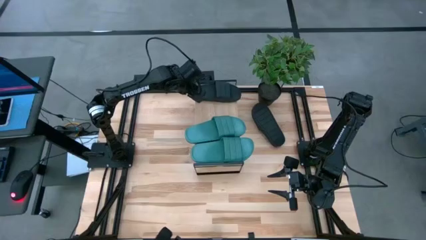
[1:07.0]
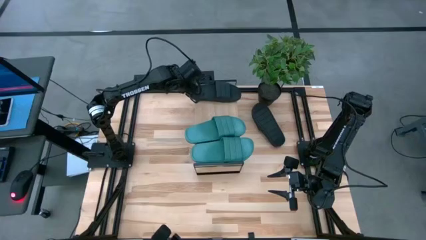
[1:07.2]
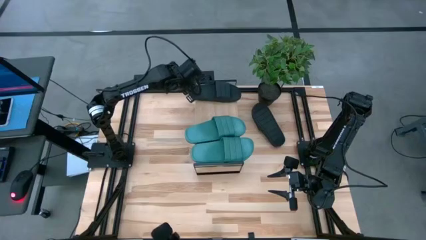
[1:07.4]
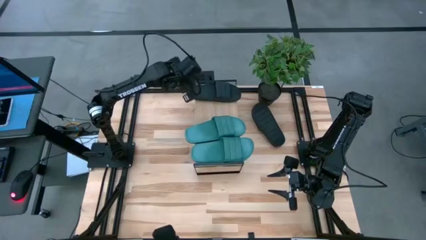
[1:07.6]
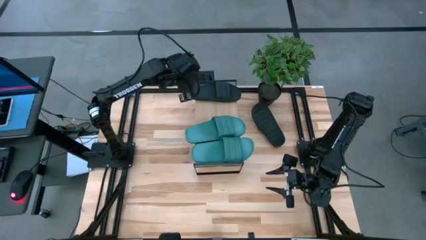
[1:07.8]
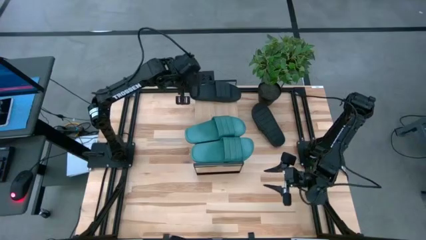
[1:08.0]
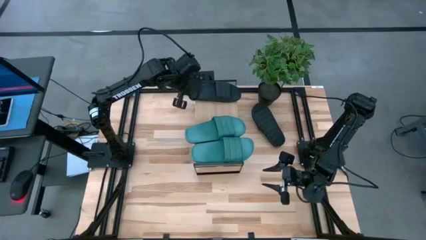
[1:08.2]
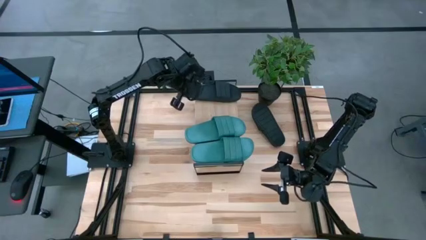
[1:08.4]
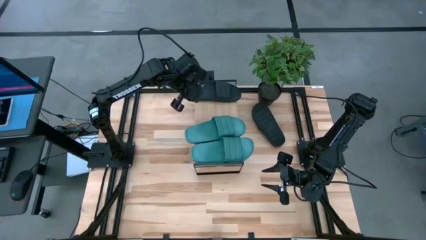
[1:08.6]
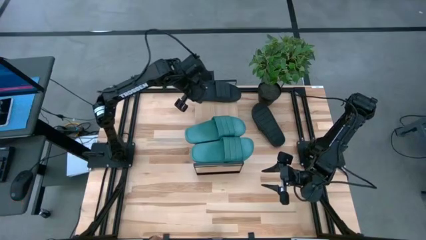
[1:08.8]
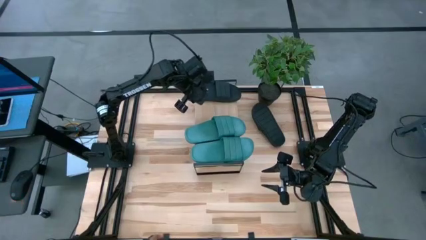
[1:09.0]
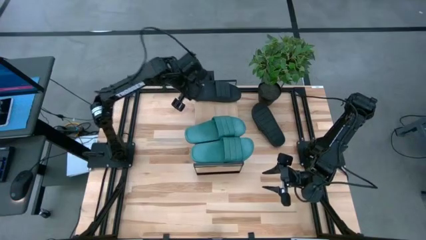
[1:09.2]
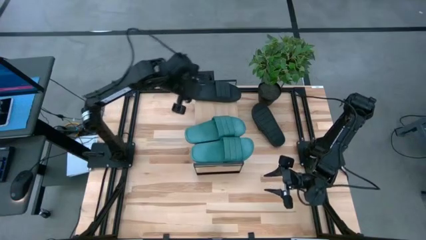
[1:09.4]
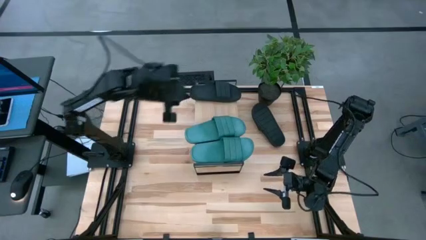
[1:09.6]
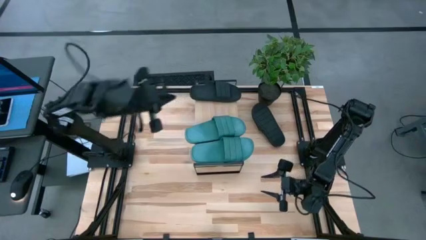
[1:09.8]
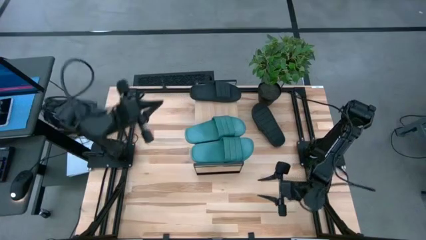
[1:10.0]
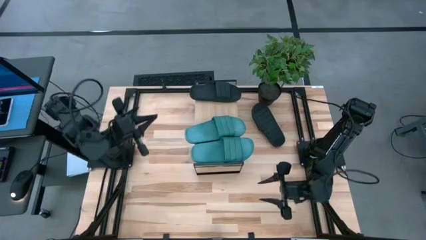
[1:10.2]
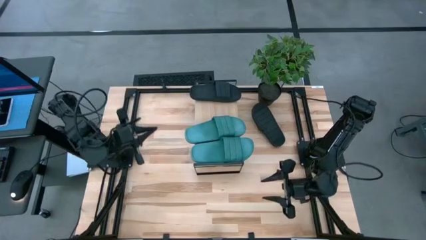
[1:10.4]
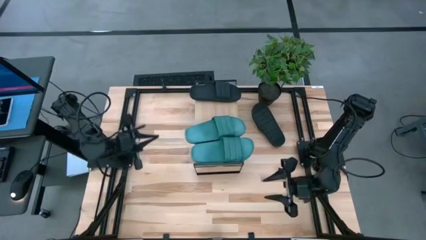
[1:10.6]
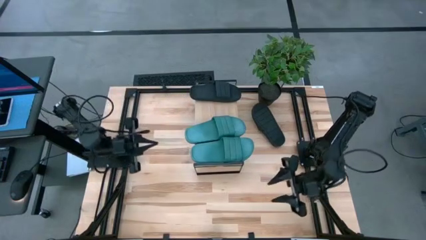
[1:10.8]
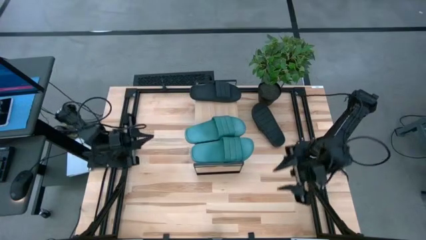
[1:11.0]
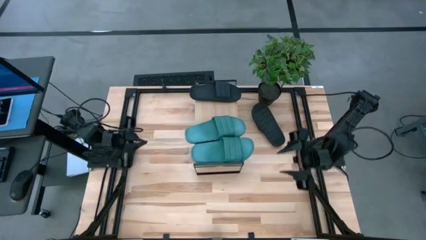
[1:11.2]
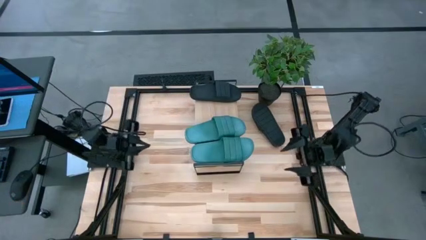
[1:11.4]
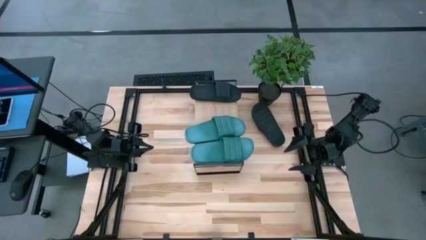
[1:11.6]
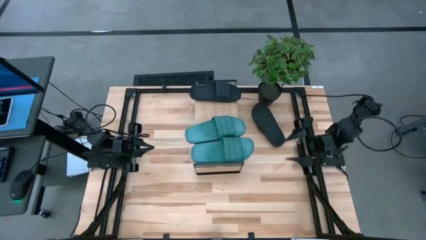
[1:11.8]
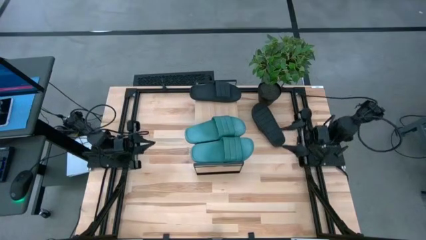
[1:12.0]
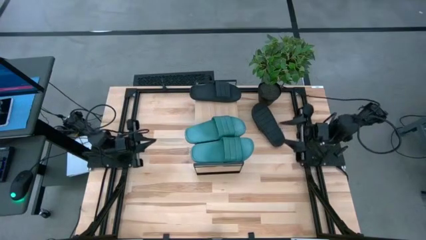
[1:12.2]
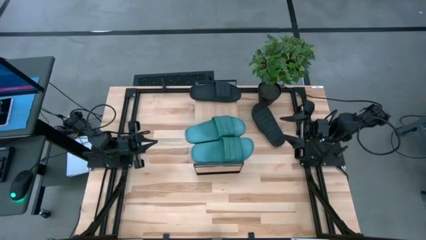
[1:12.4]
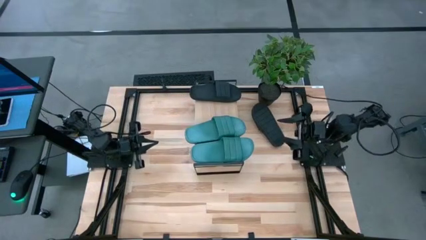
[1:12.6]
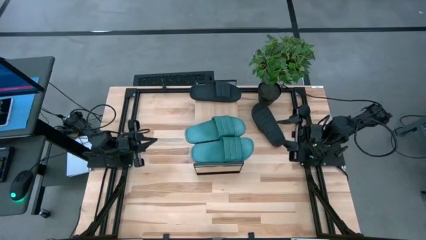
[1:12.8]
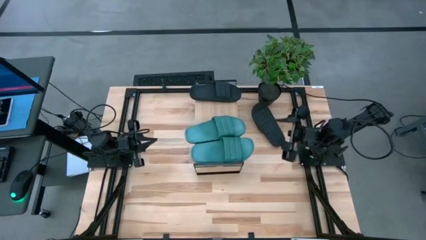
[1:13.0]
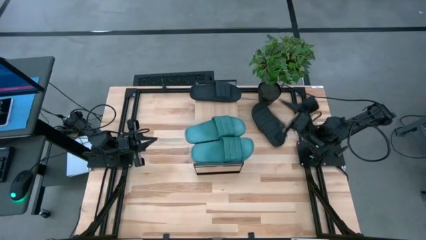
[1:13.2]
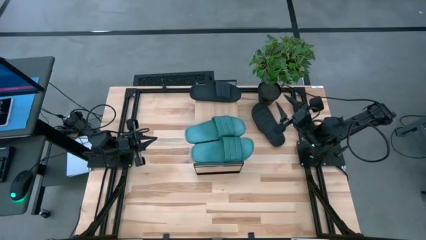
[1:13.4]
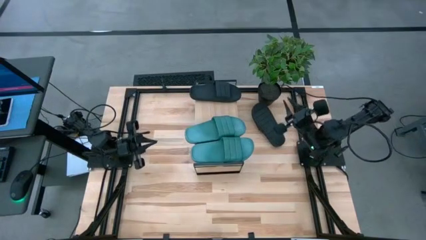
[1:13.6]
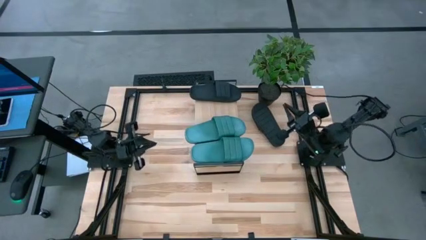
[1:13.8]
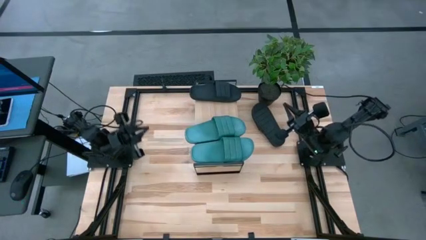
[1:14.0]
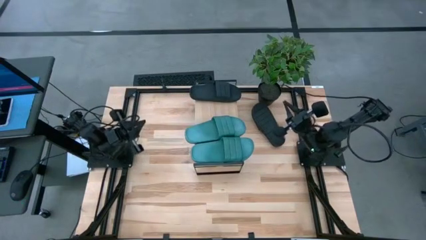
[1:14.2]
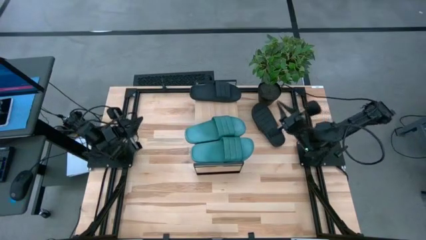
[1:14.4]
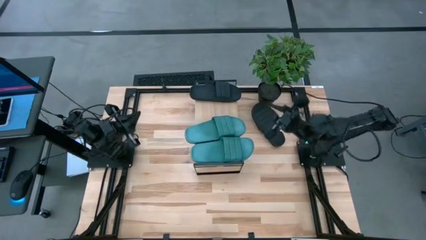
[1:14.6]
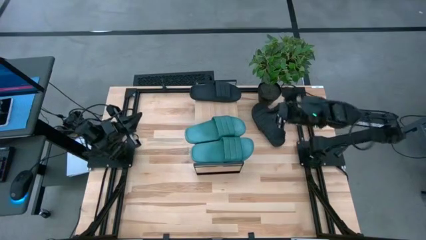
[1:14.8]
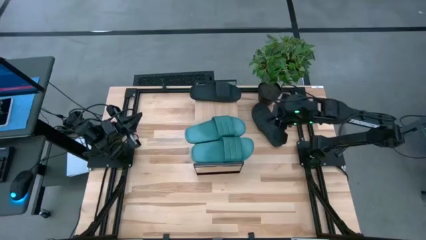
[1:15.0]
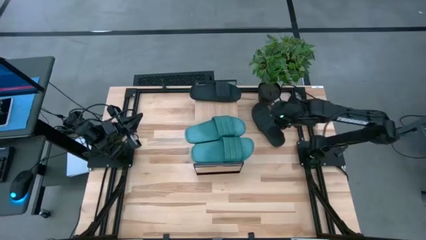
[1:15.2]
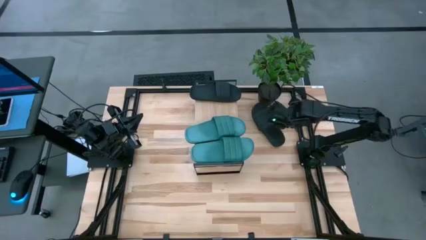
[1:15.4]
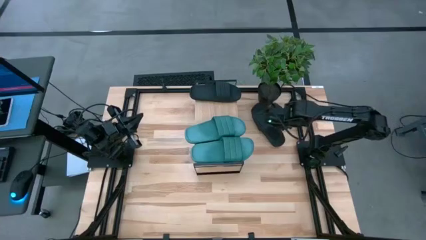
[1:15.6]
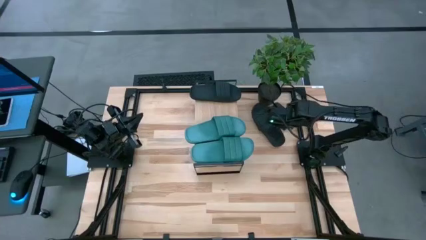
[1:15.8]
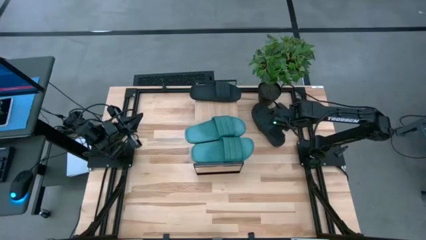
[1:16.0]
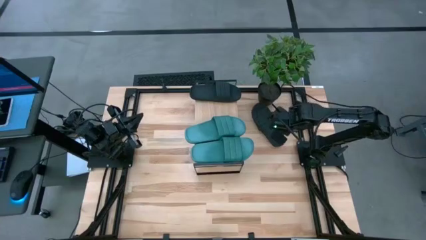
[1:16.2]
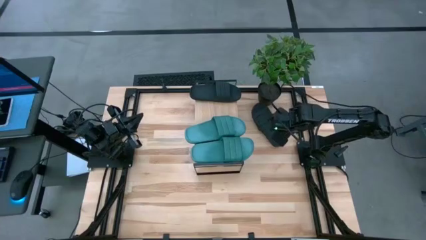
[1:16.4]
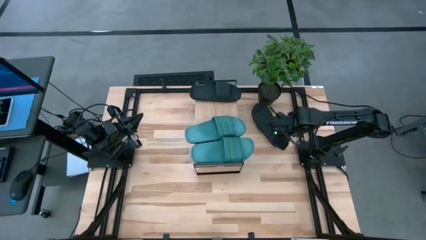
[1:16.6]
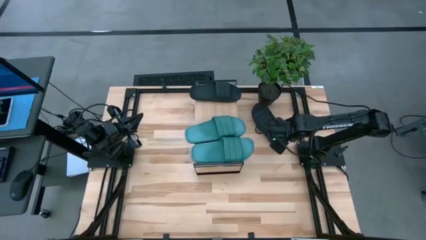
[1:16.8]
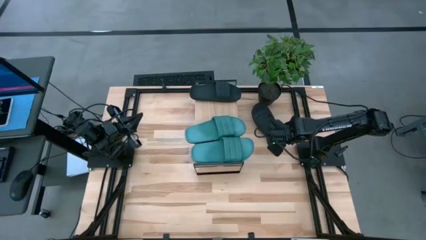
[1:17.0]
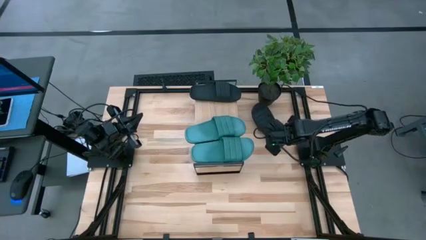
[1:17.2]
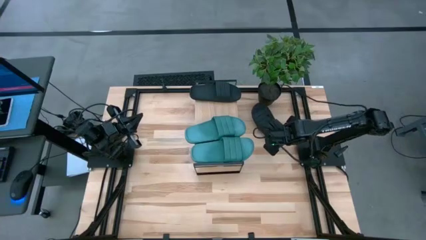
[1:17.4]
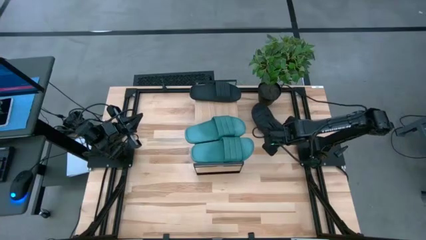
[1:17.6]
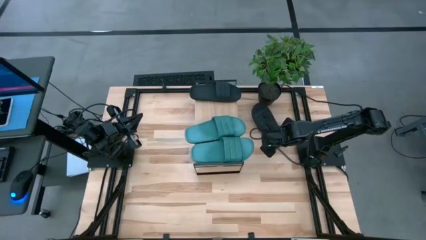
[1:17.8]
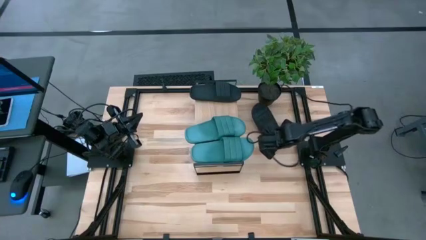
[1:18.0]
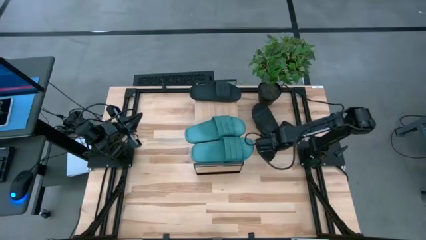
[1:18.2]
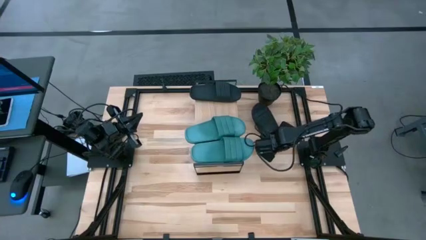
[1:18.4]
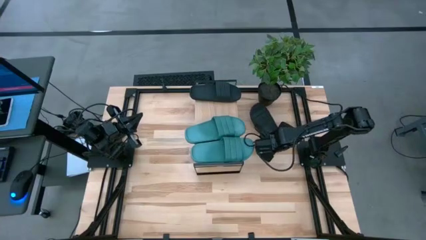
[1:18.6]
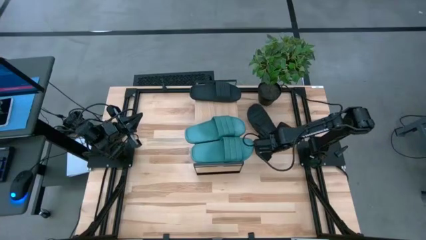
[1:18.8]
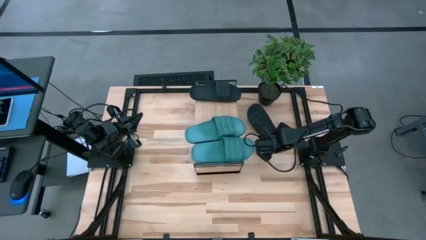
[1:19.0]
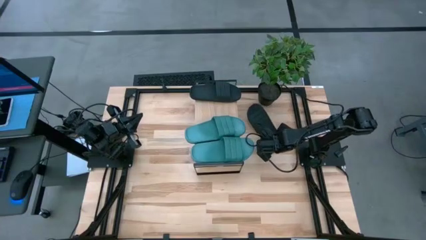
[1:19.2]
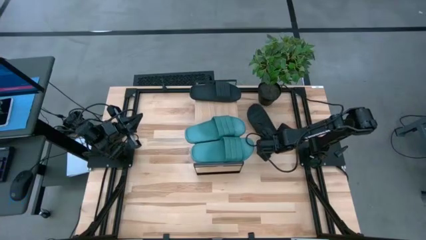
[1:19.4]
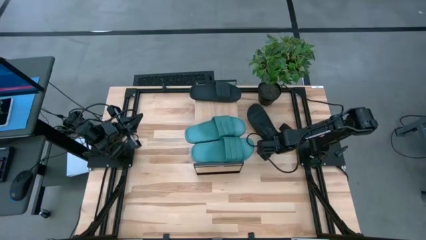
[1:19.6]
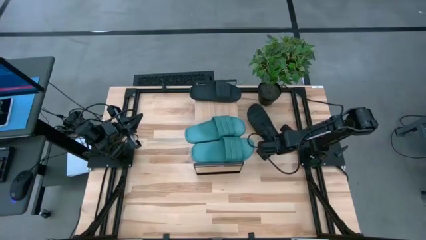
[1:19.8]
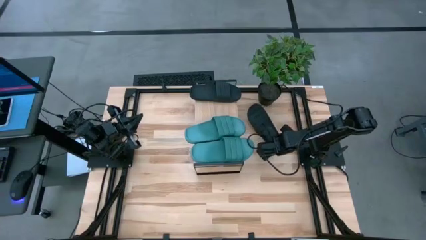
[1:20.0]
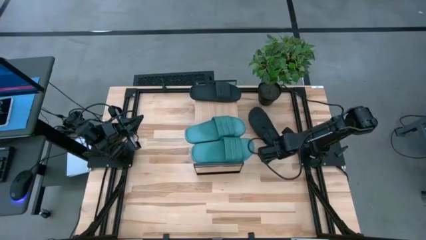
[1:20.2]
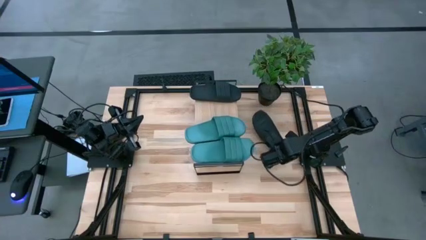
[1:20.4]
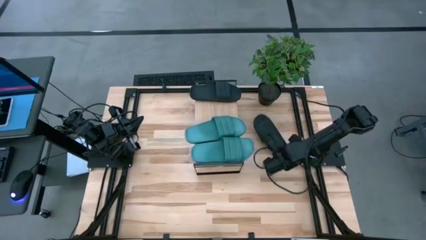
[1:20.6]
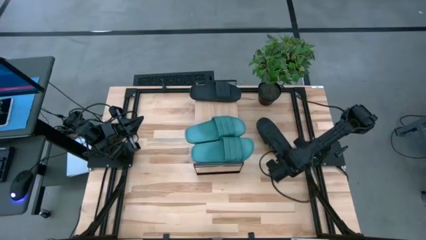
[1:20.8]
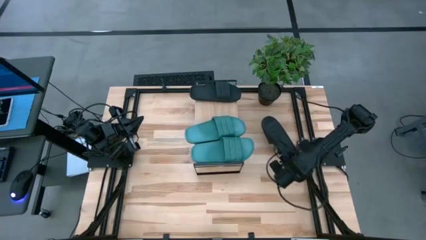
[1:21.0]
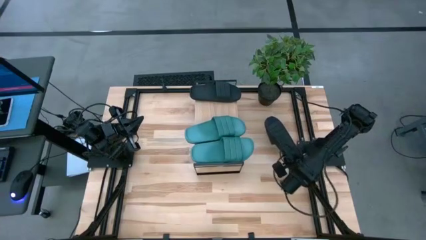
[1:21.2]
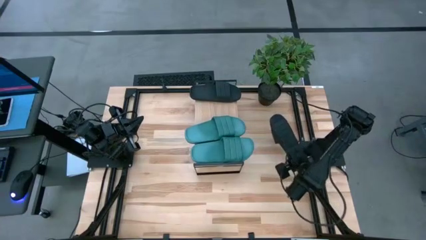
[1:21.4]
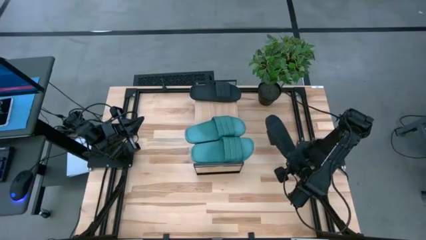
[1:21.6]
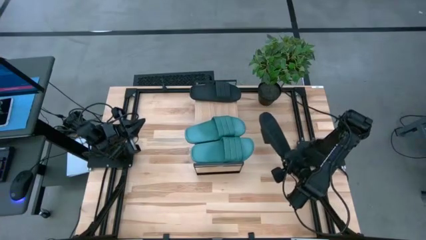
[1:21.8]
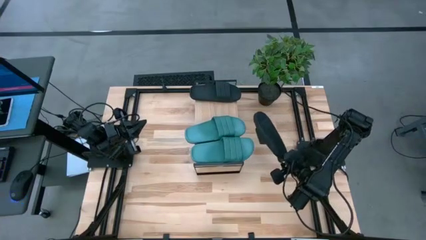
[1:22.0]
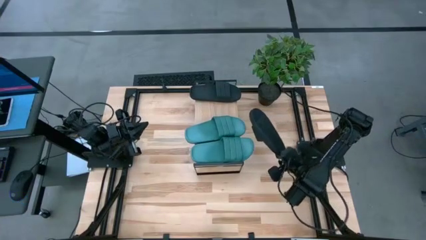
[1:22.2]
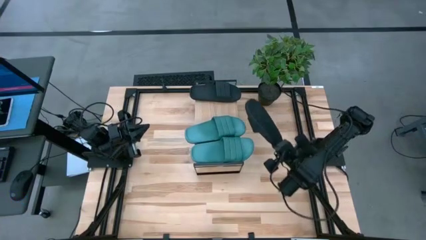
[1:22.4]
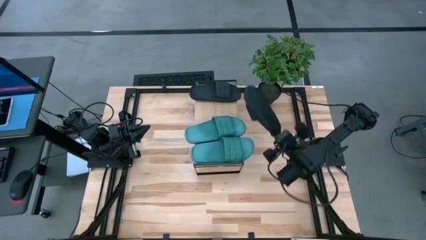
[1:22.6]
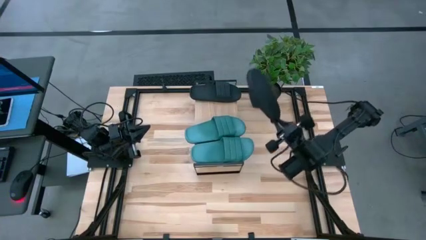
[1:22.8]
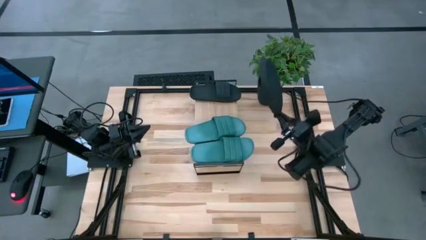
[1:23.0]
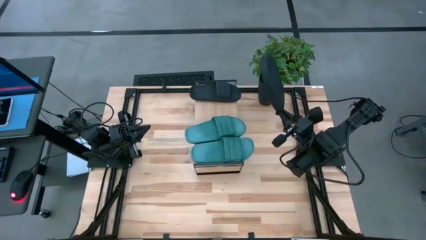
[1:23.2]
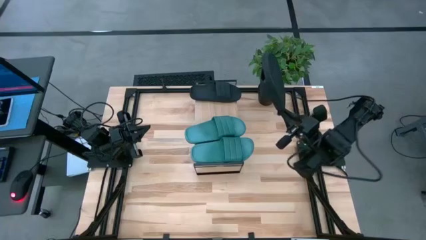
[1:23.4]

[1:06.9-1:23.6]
Task: Pick and place slides into the shelf
Put the black slipper on the shelf
